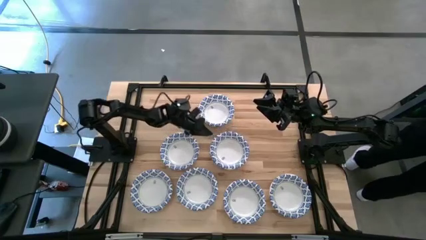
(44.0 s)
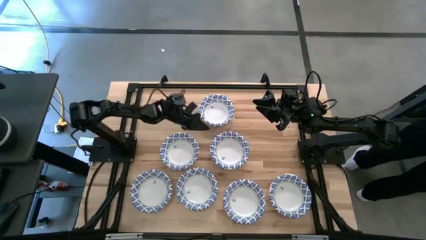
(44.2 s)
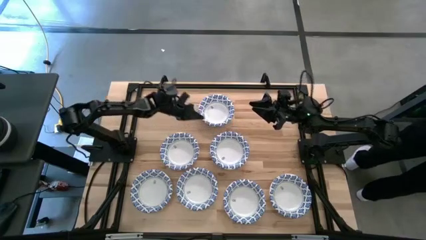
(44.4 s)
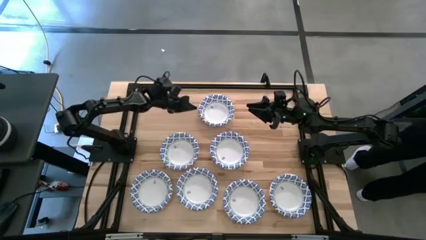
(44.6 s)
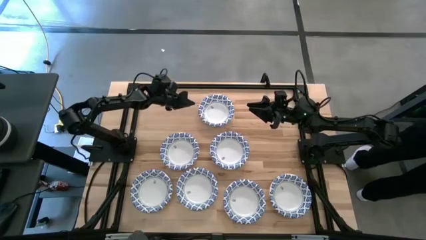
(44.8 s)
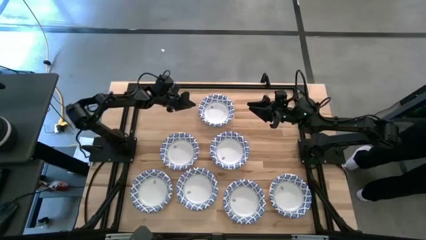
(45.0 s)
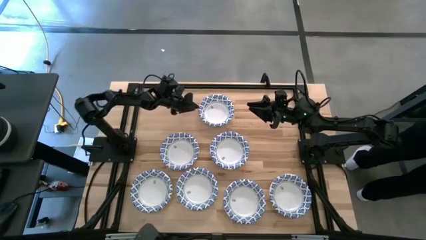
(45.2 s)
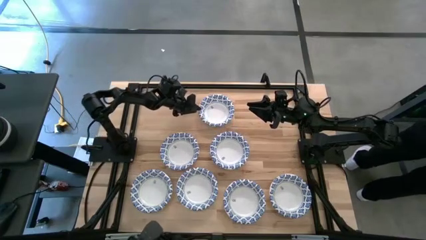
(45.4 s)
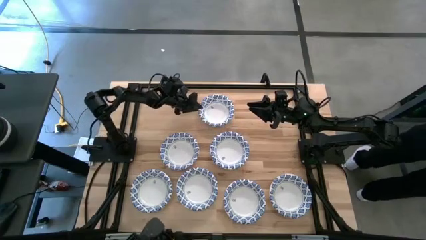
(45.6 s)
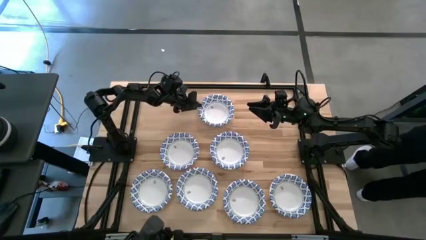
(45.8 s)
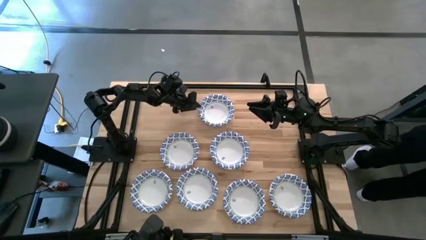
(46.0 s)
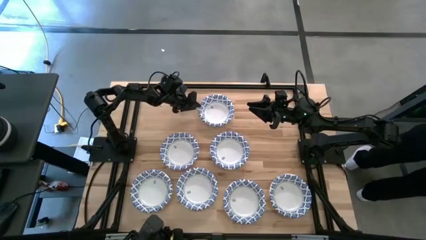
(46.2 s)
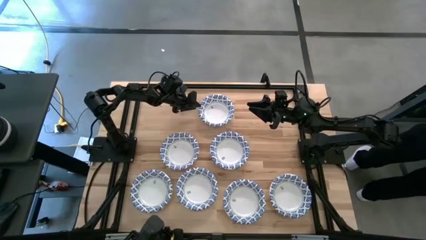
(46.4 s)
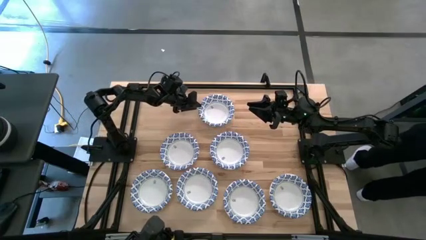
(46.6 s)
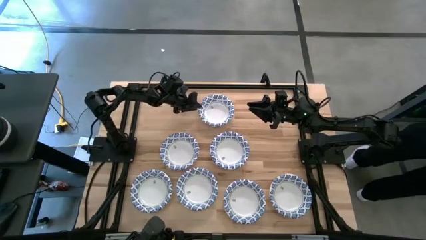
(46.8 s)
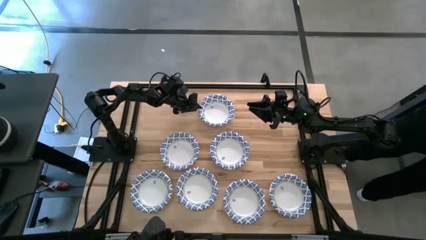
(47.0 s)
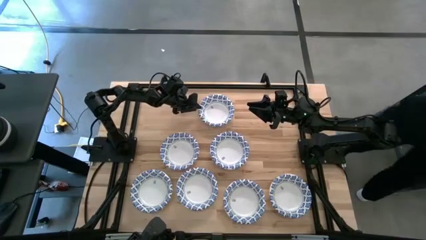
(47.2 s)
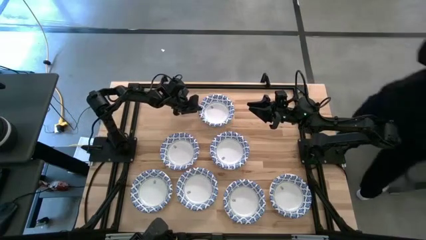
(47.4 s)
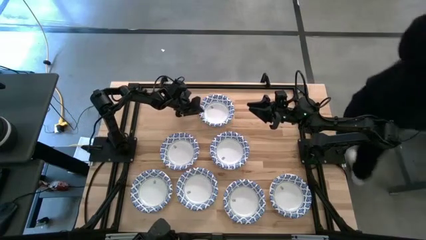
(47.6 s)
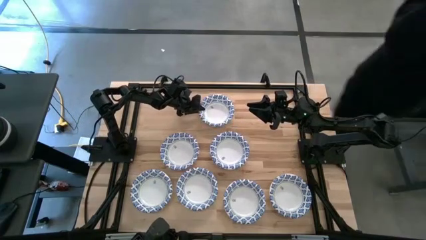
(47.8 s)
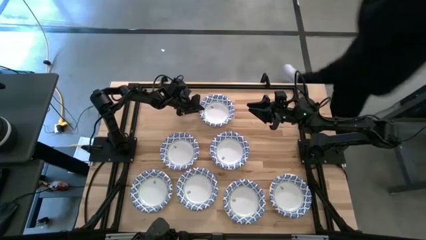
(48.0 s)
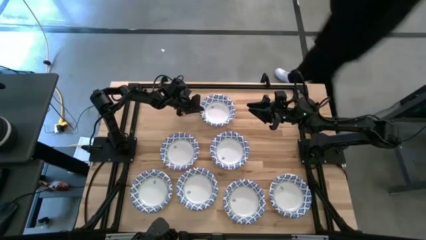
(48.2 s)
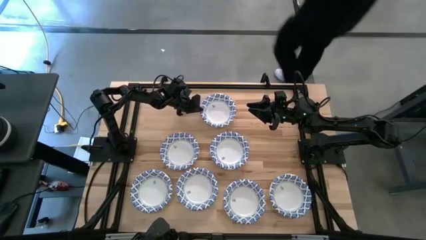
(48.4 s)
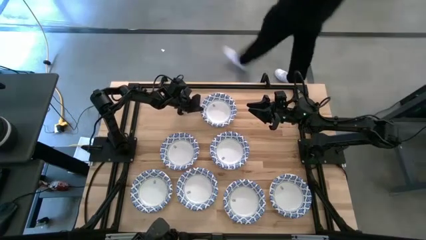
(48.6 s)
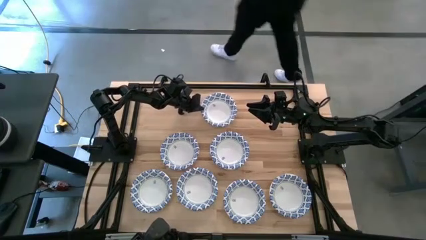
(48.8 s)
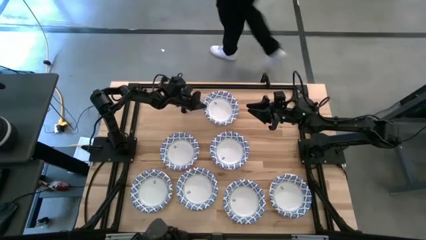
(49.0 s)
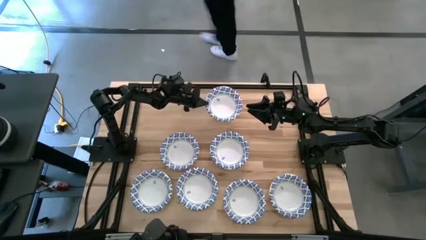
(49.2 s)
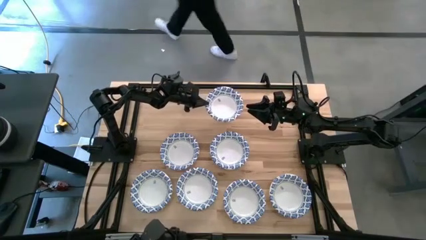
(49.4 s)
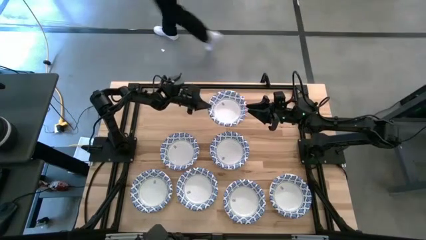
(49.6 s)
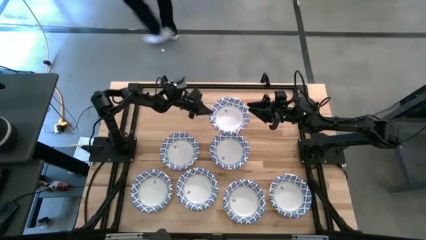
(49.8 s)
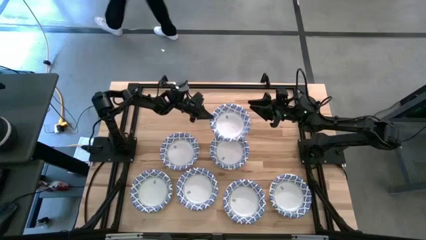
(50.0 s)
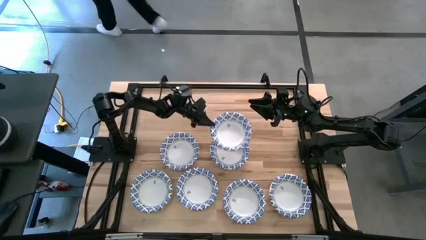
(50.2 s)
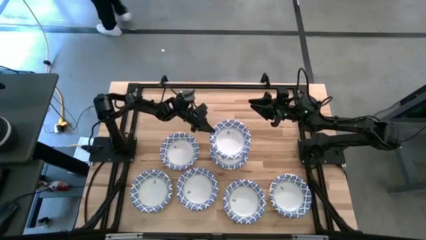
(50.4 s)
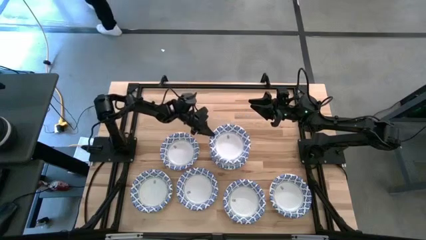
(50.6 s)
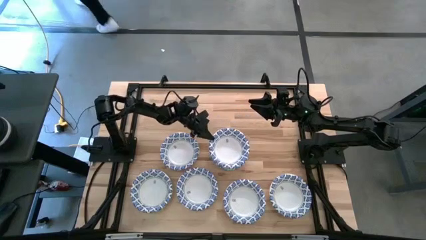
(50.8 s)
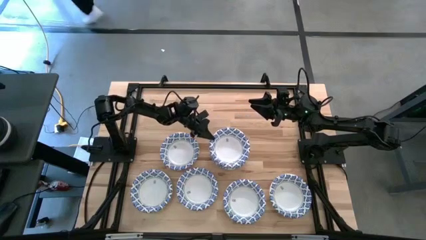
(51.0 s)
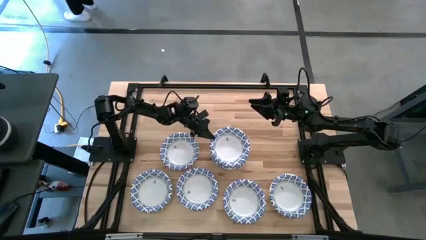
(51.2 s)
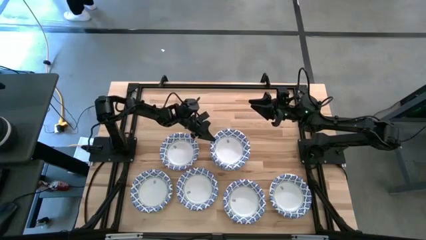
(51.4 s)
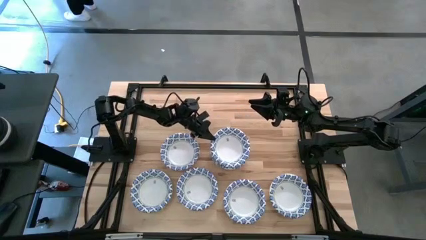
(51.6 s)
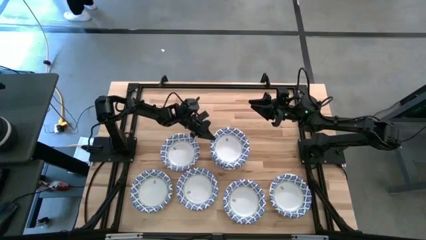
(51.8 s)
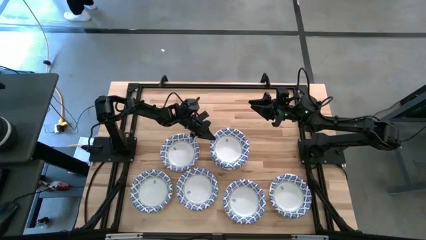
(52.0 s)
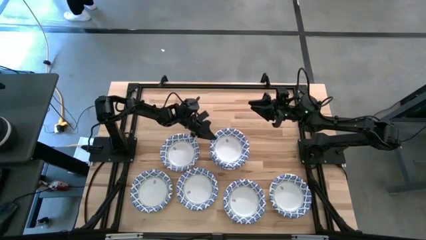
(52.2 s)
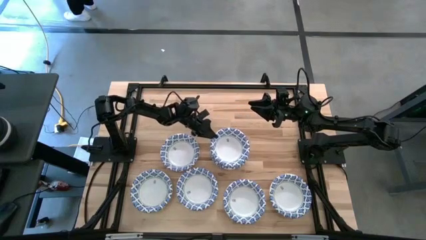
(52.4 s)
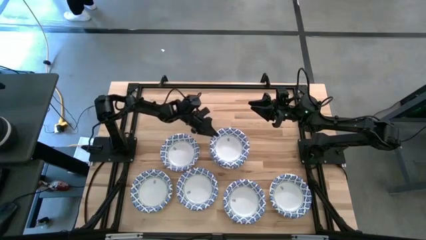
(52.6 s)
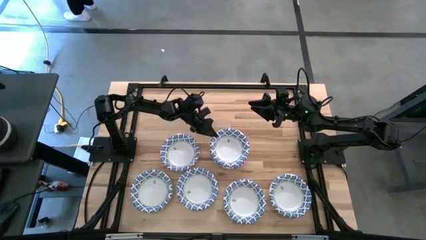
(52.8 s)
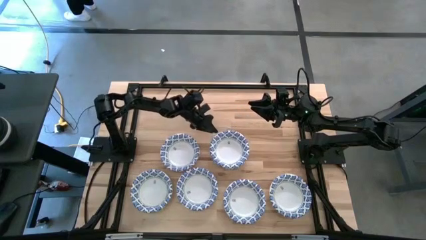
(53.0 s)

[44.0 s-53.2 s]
Task: Nest bowls inside each other
Stack the white patterned bowl on top of the other white patterned bowl

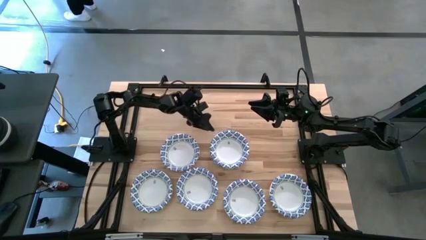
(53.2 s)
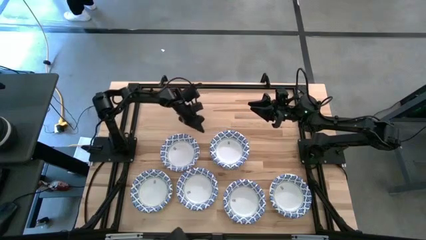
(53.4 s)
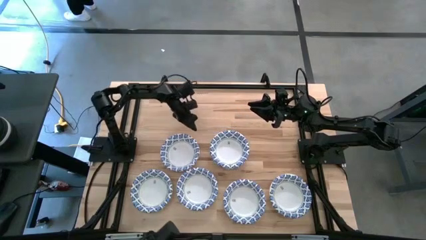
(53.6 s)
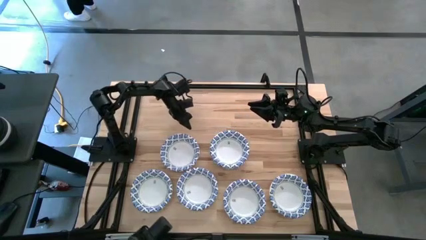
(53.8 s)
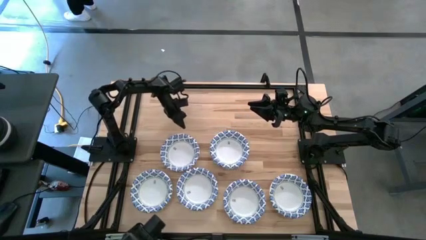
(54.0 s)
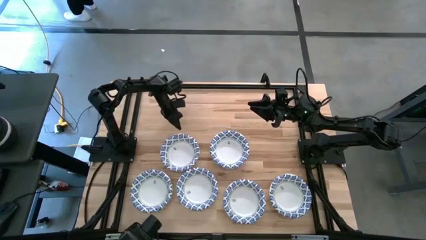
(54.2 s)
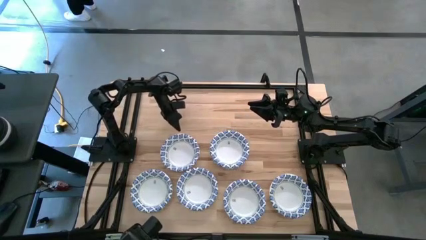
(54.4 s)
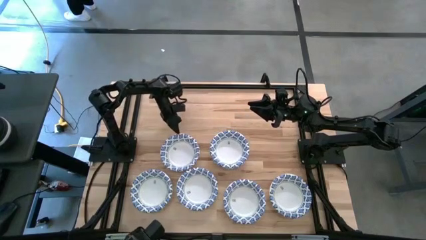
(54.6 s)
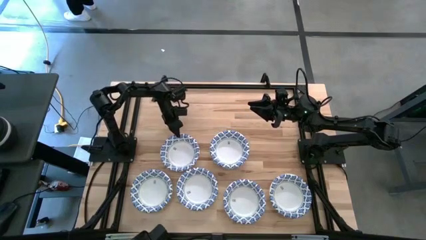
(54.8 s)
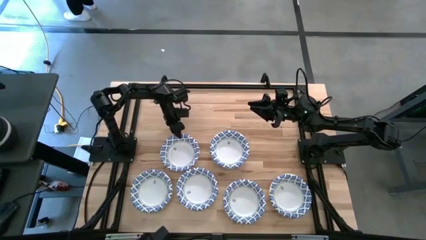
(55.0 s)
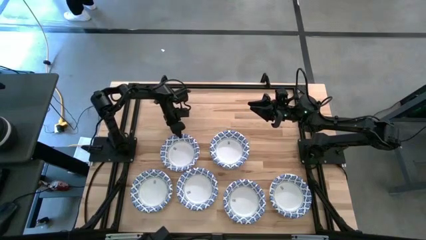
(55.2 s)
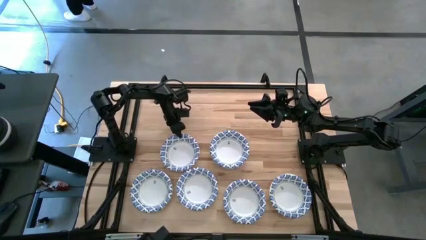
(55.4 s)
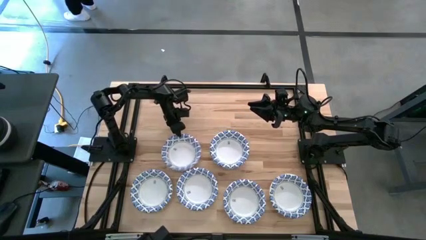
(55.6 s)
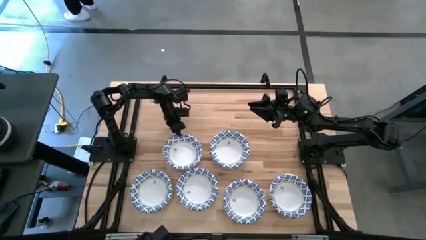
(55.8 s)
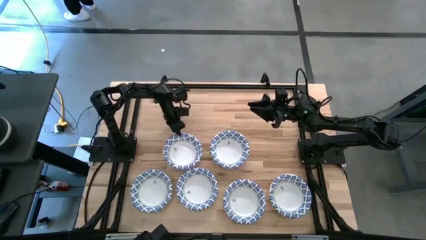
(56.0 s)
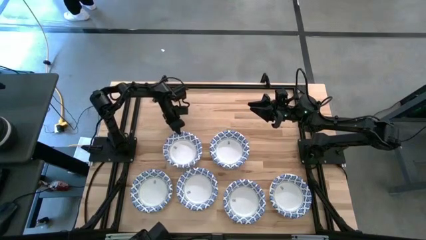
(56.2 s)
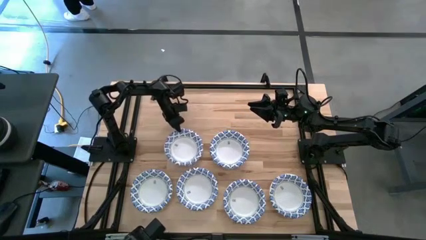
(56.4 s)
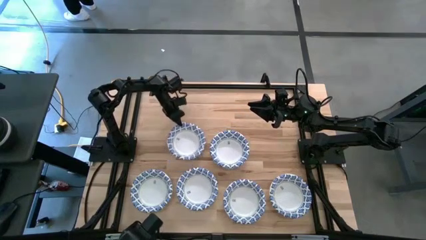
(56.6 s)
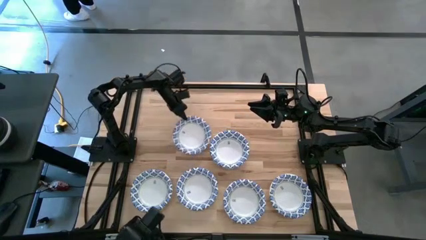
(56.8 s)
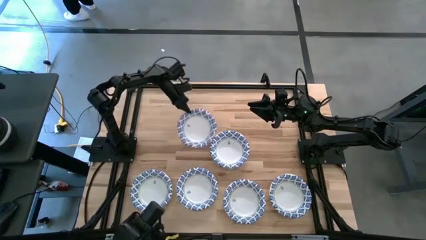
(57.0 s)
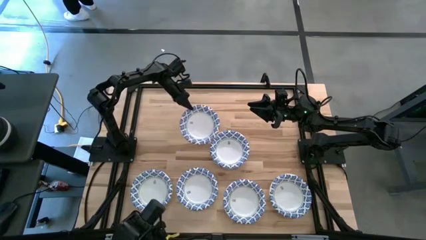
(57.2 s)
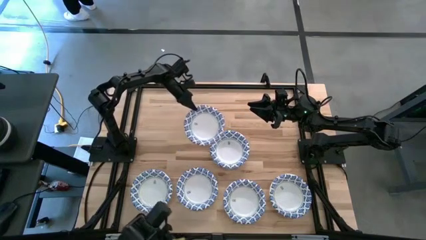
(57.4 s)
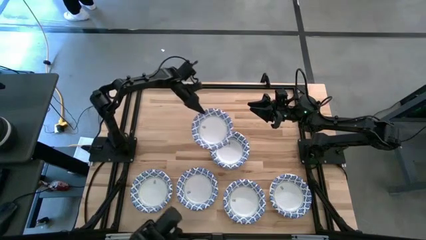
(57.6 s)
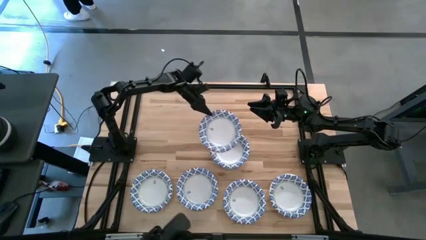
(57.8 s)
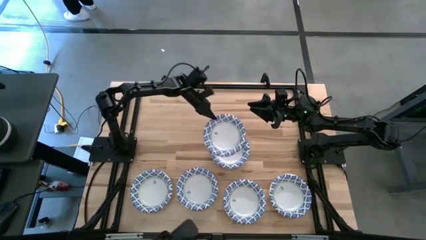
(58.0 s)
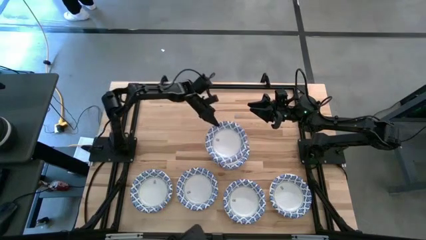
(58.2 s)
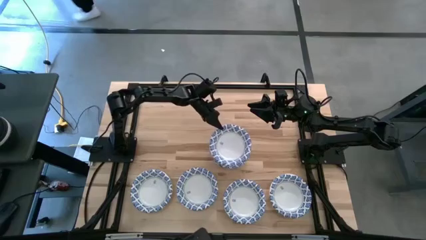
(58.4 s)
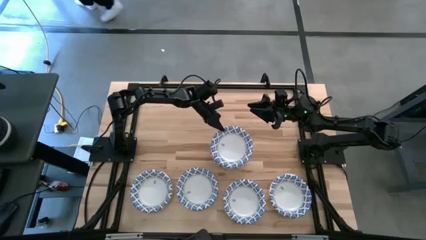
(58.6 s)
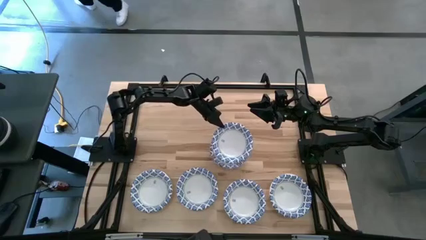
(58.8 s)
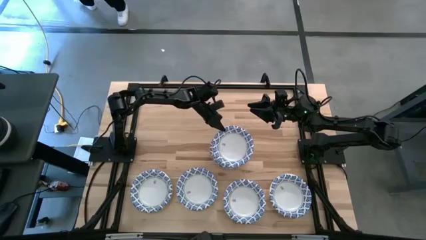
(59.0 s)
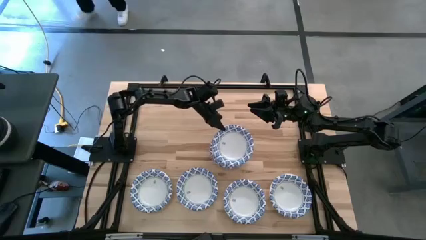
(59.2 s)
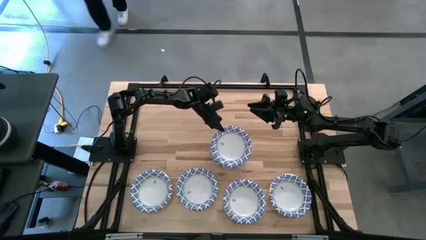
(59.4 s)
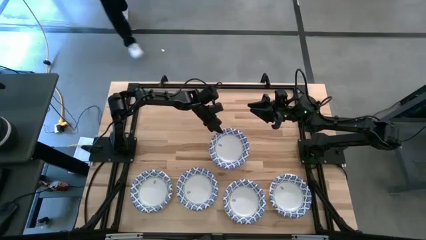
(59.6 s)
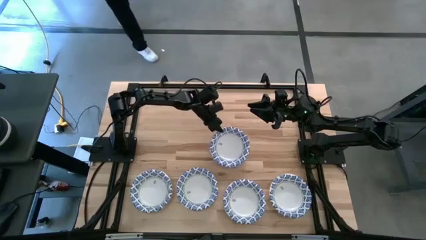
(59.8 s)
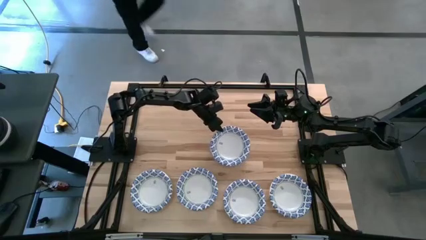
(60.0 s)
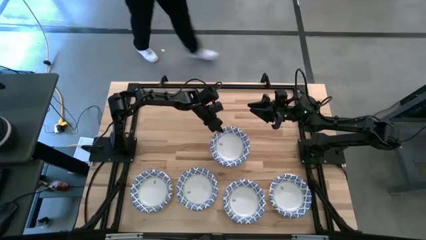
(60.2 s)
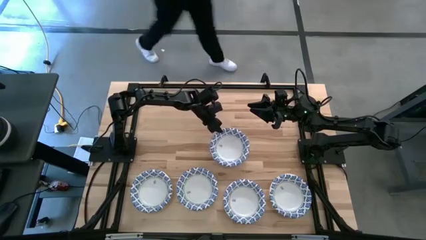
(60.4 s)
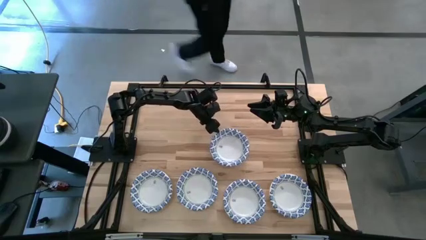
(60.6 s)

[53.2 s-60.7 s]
Stack the white patterned bowl on top of the other white patterned bowl

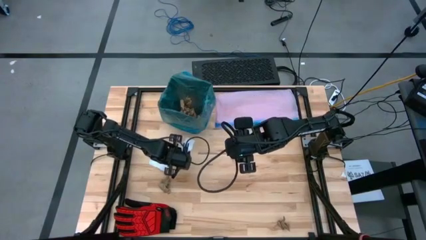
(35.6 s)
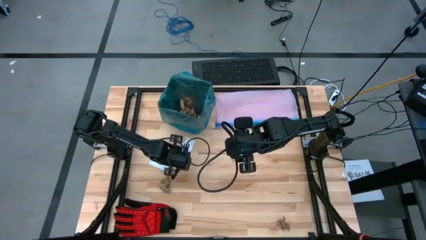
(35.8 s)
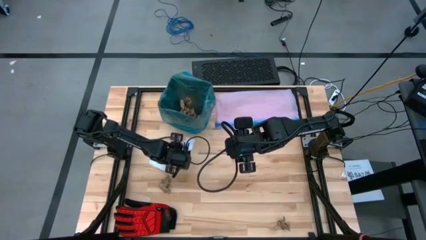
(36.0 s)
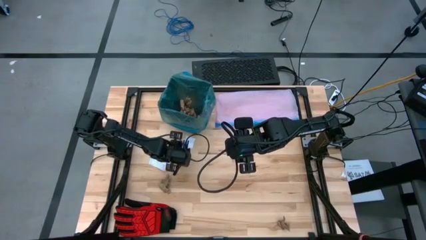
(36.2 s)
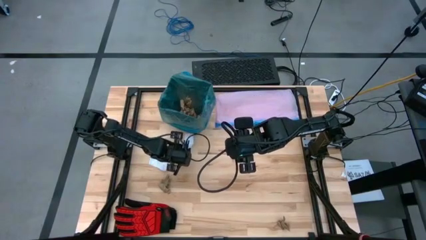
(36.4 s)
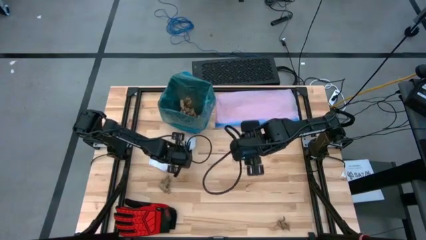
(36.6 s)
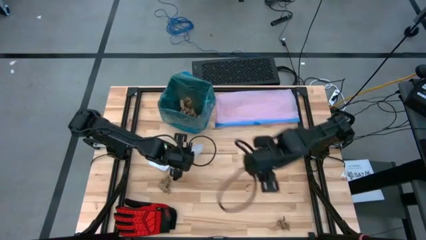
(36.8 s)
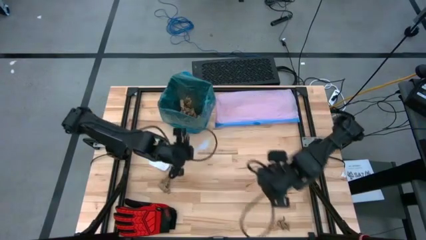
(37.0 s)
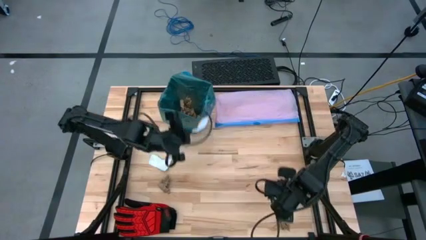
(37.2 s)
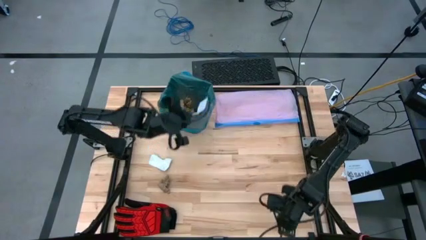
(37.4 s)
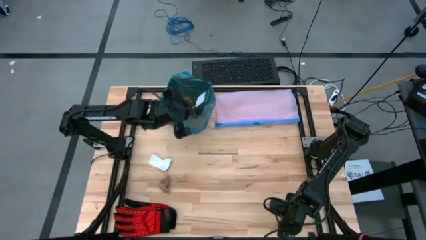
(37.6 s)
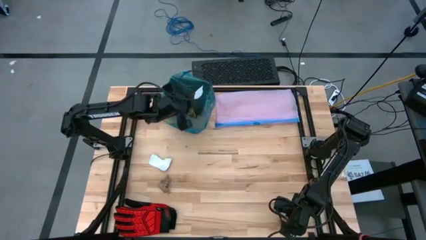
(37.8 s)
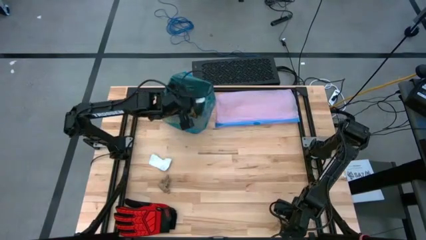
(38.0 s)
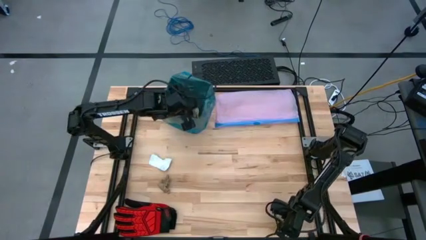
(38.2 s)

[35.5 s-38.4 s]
Task: place trash/remove bag and relplace
Put the white paper into the trash bin
